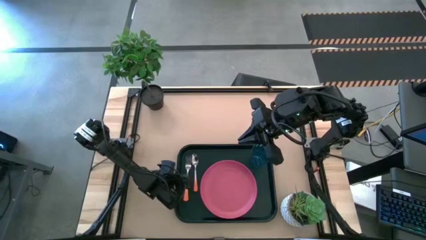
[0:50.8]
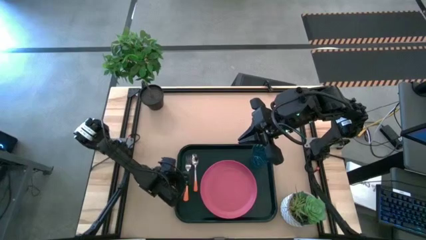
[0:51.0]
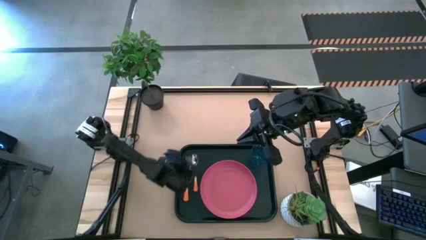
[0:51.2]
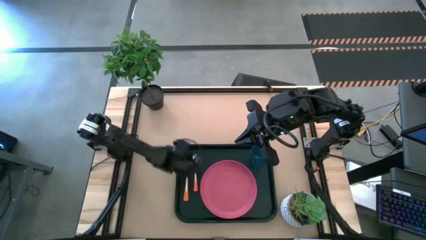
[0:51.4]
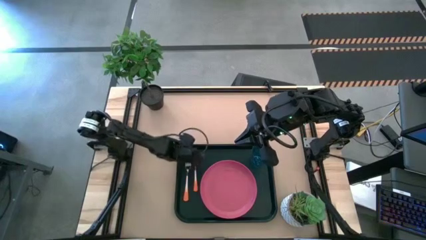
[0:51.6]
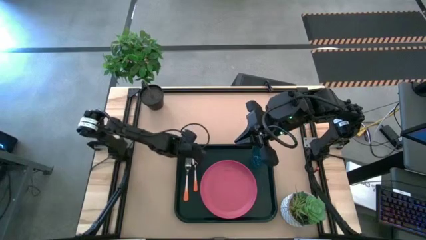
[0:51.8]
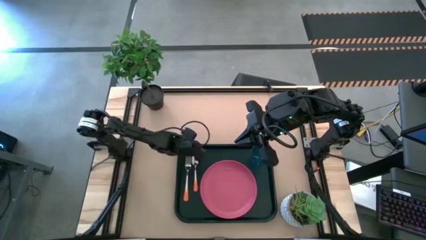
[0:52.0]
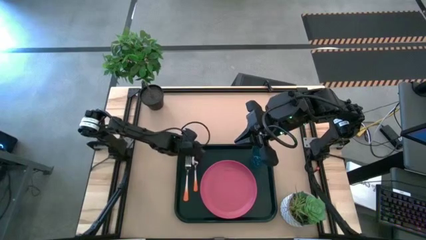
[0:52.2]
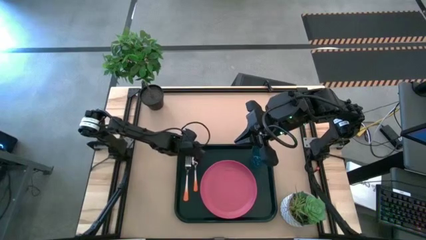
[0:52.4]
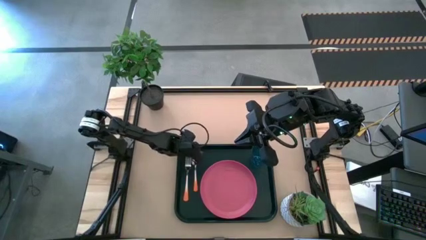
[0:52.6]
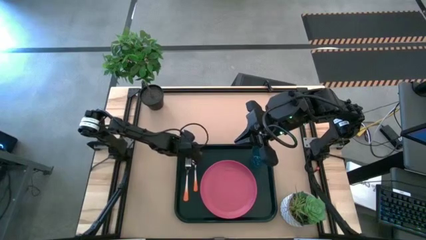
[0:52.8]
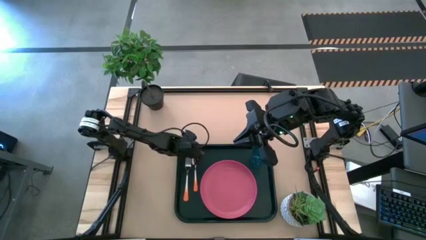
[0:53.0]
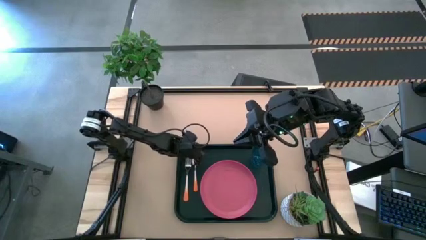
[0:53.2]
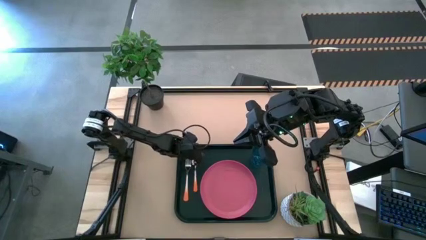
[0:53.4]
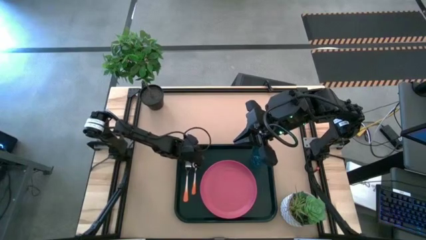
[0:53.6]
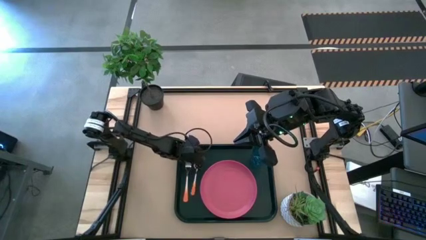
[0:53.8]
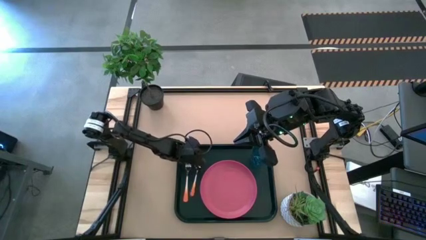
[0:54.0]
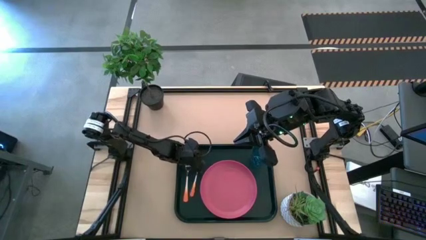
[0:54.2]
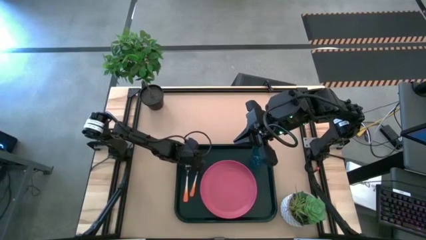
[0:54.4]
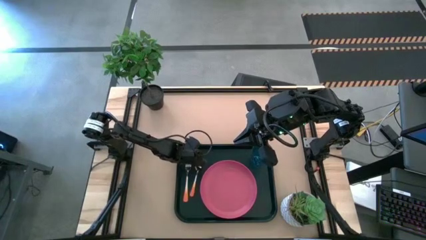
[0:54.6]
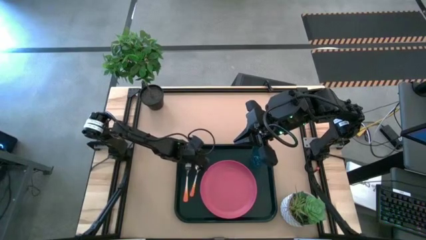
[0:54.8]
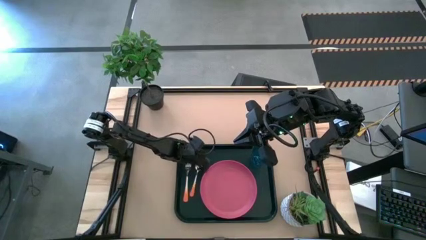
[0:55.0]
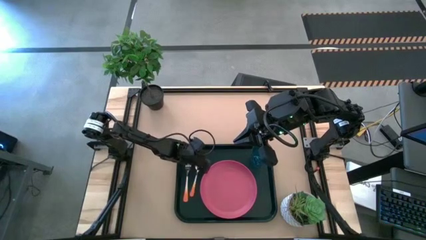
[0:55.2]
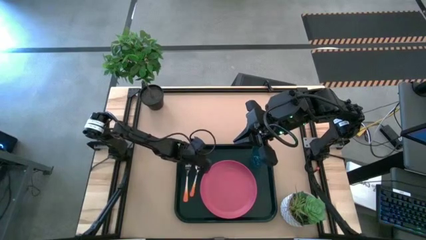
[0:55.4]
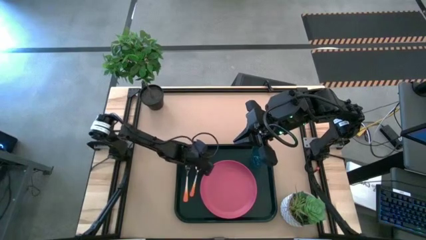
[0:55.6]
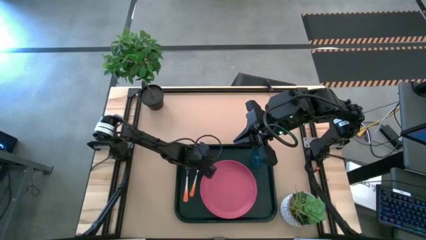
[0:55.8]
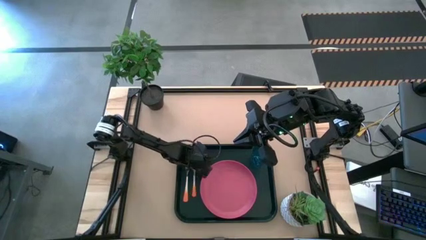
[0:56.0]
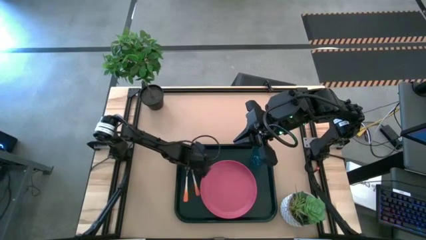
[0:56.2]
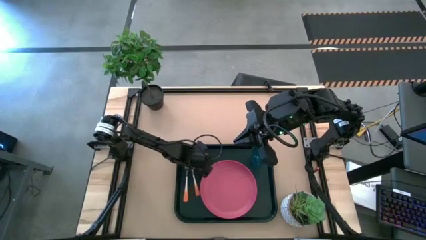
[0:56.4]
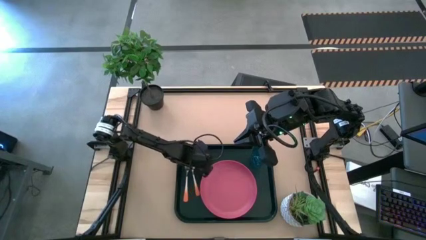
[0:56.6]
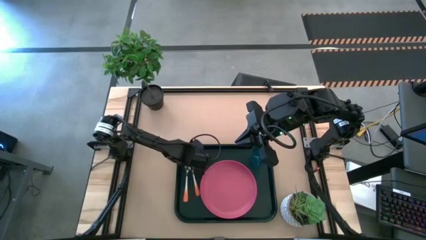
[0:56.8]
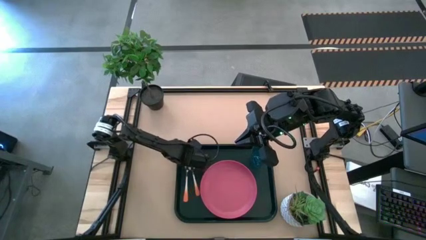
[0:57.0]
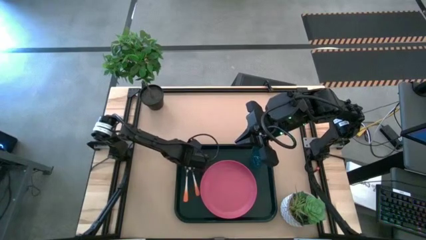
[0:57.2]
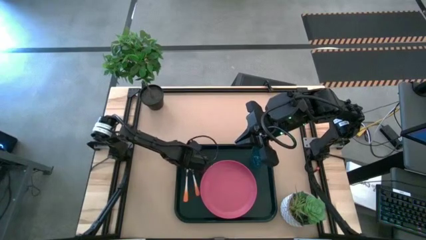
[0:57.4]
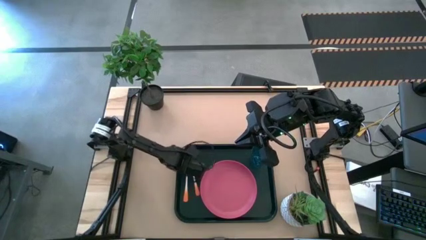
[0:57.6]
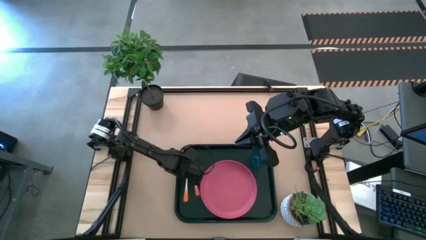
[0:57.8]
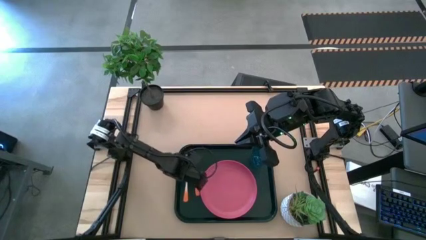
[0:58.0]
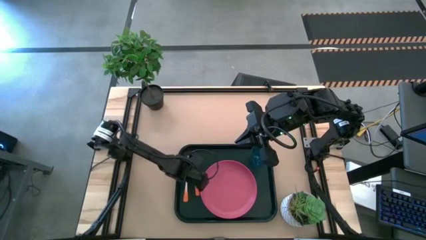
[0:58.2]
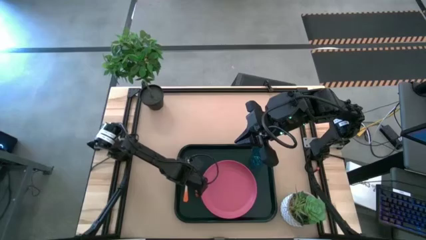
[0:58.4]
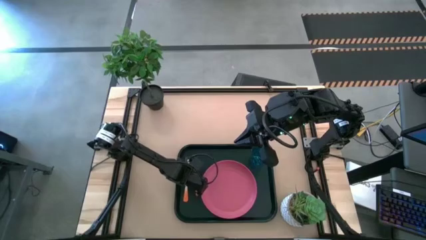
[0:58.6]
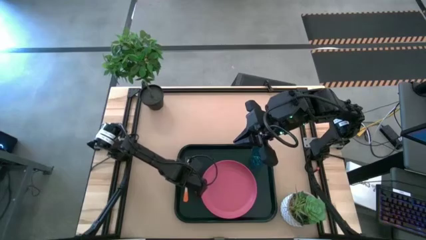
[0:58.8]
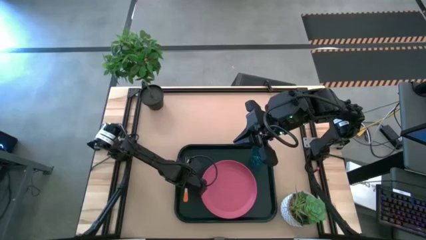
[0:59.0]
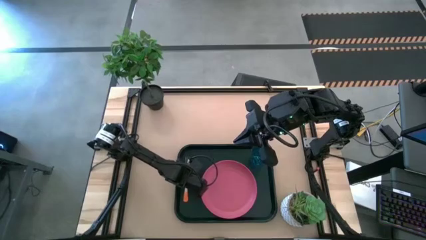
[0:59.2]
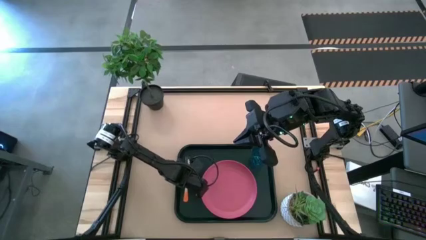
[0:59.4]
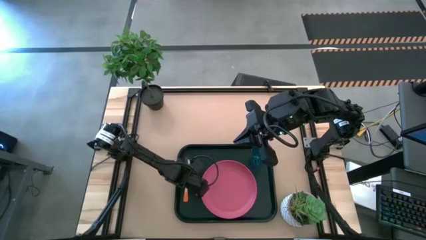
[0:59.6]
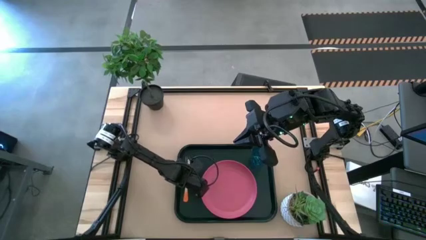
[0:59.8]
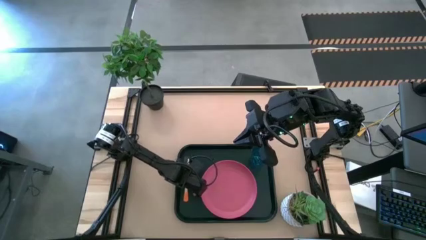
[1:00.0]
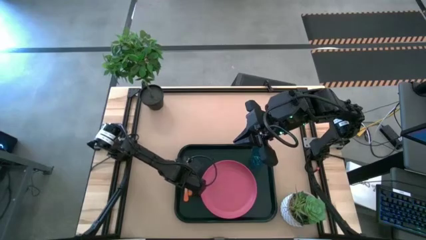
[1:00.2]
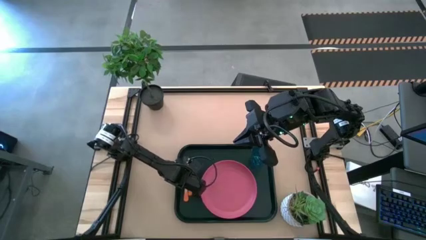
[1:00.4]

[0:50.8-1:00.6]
Task: Pick and place plate/cup/fork/spoon on tray
Adjust the orange spoon

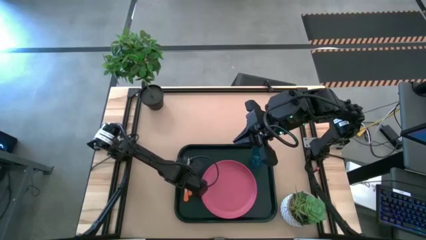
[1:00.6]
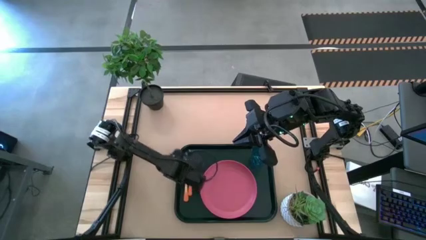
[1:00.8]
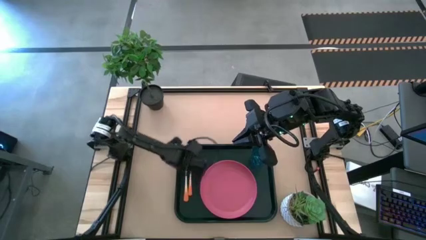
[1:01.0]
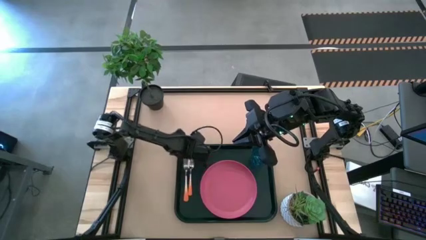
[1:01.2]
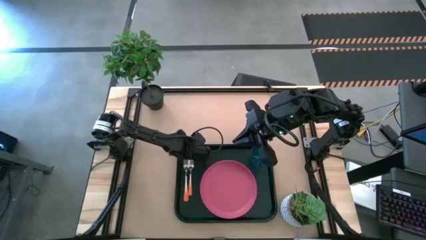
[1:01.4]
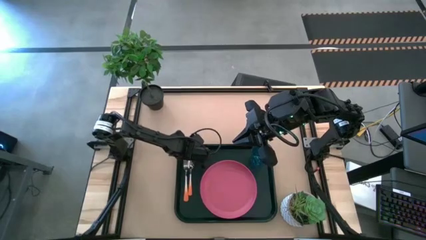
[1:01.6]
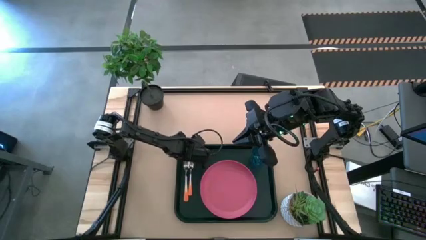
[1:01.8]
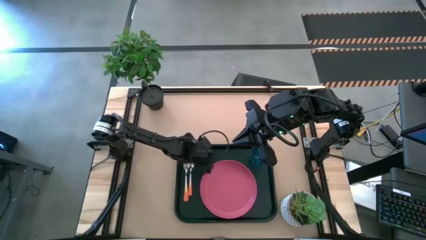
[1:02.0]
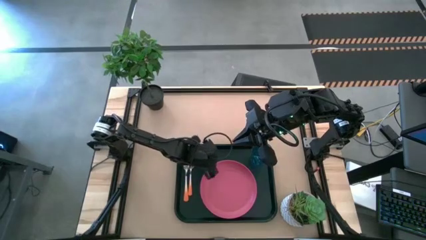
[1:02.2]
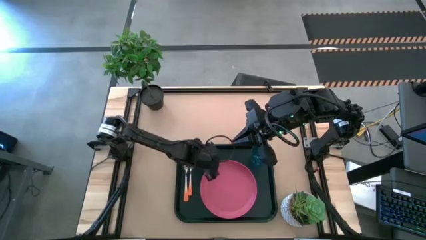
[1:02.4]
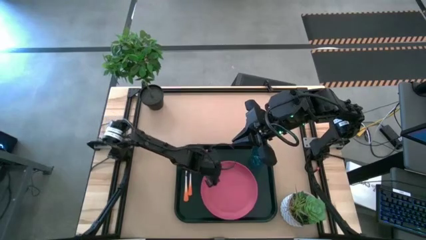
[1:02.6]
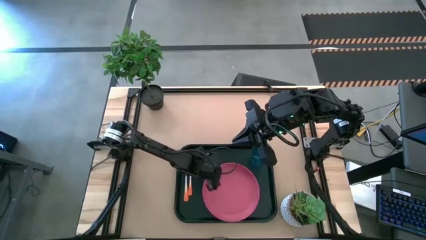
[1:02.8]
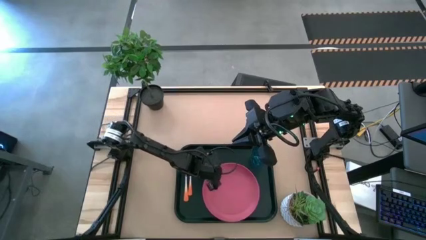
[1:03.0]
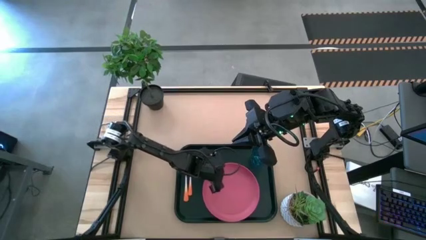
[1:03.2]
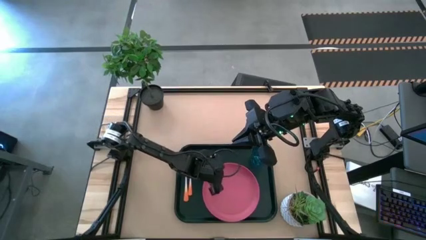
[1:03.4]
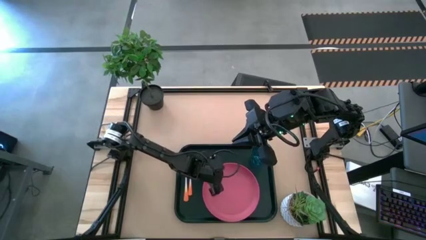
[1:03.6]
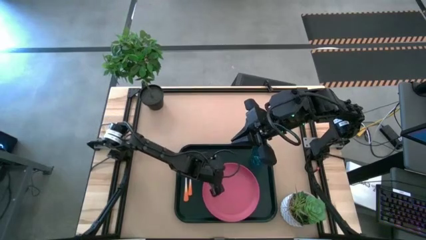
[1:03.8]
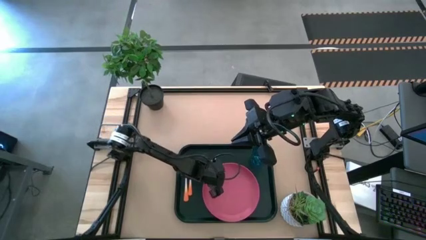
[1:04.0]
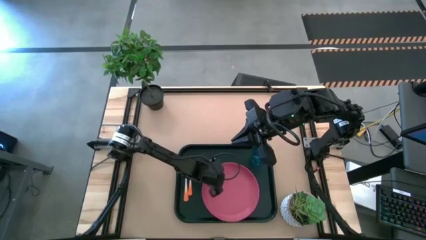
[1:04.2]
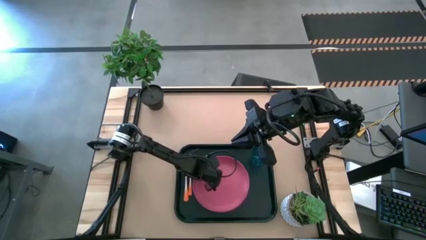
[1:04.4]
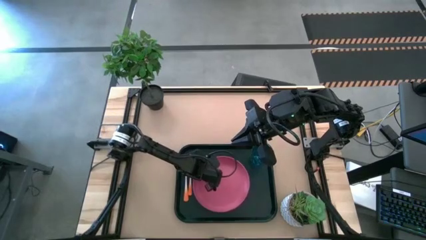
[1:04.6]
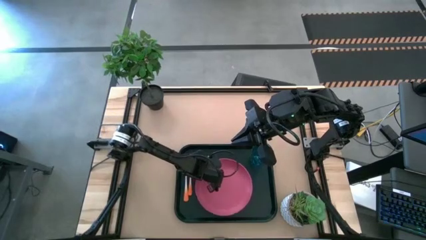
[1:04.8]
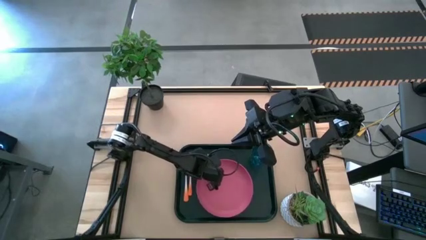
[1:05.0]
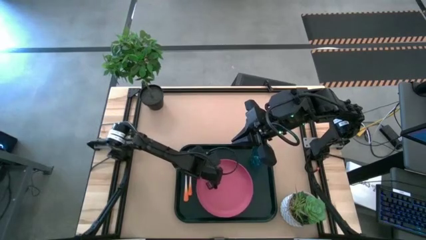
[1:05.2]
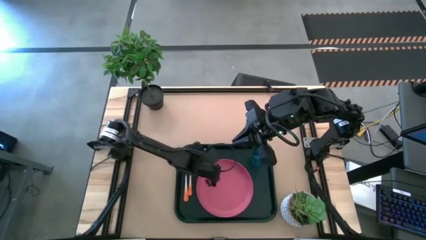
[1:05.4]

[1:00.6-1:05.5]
Adjust the pink plate
